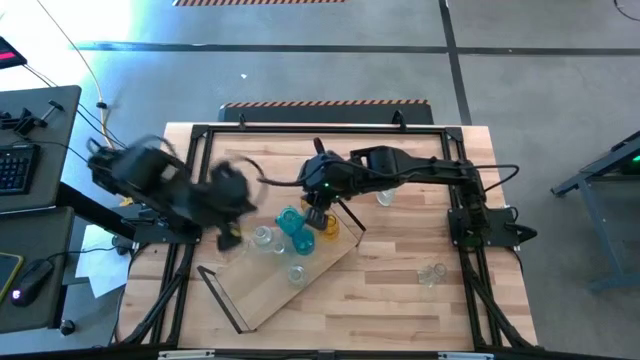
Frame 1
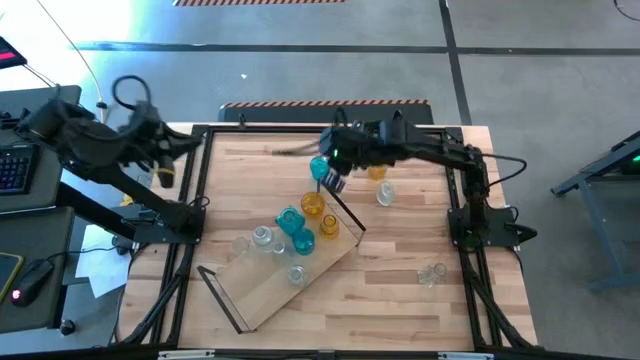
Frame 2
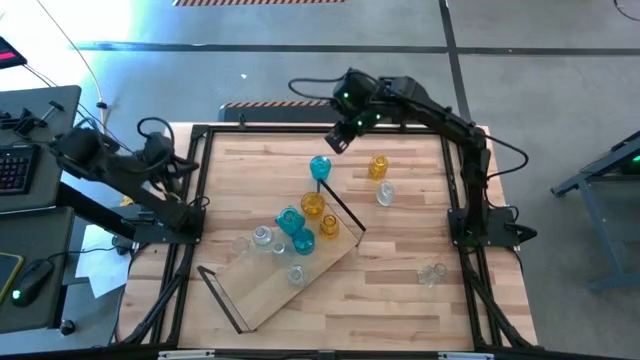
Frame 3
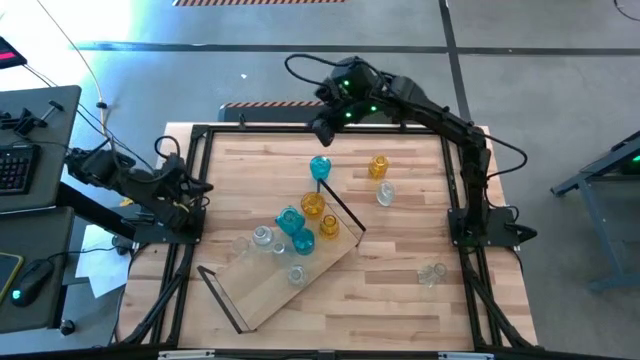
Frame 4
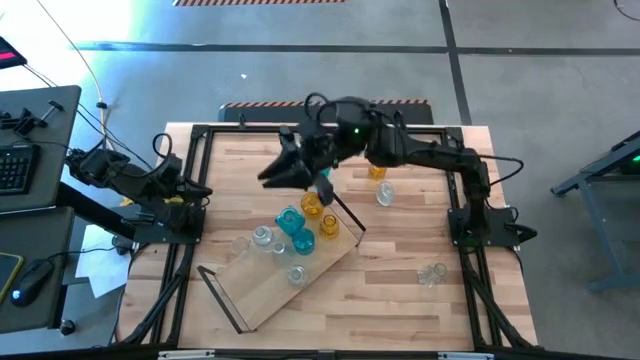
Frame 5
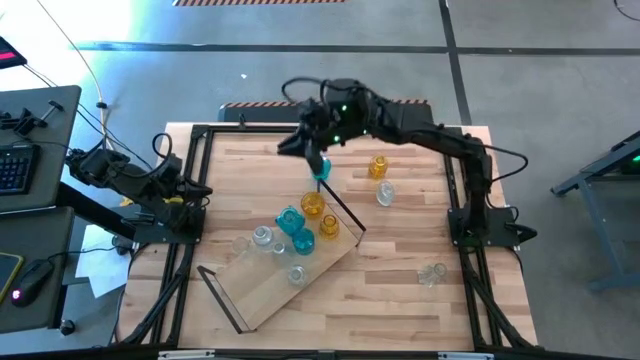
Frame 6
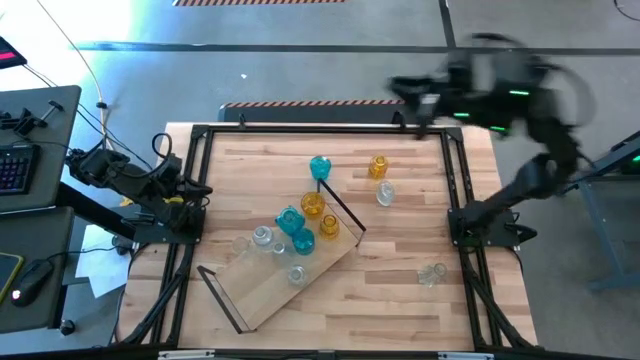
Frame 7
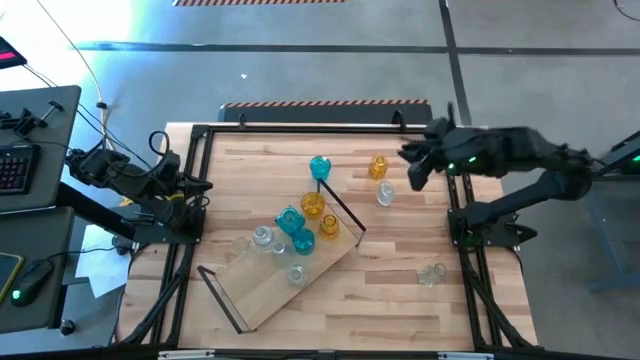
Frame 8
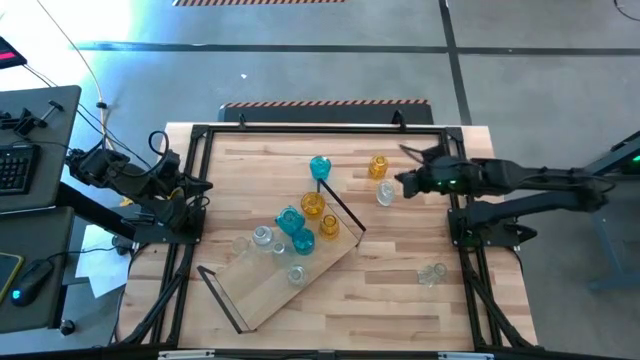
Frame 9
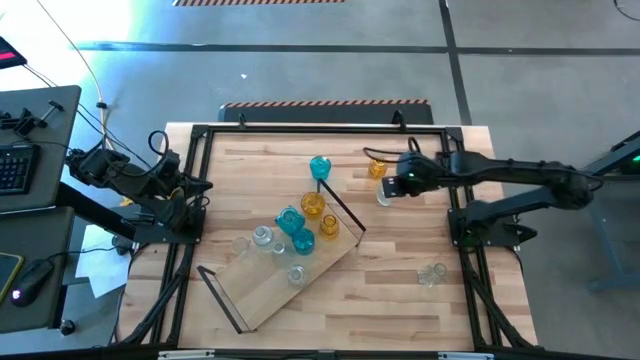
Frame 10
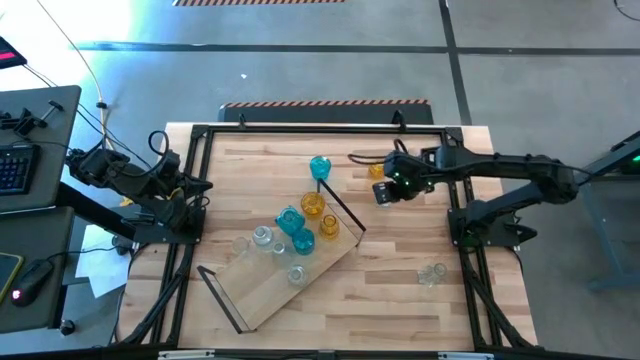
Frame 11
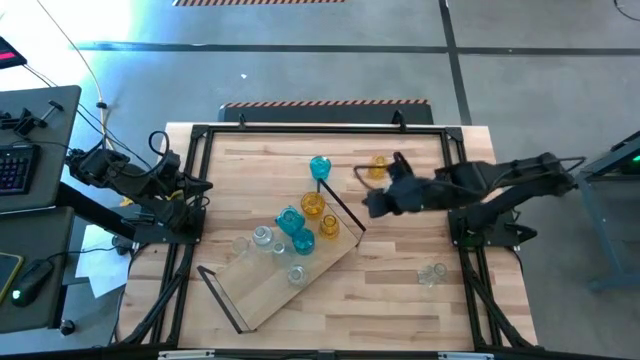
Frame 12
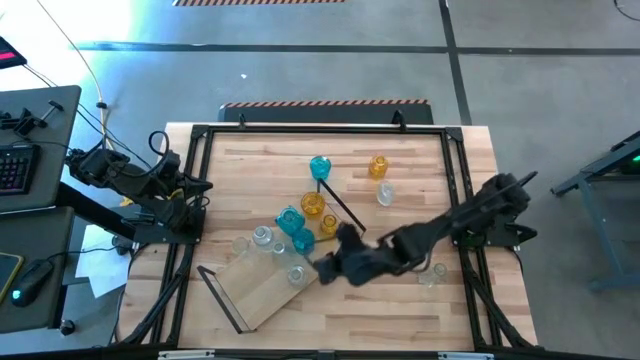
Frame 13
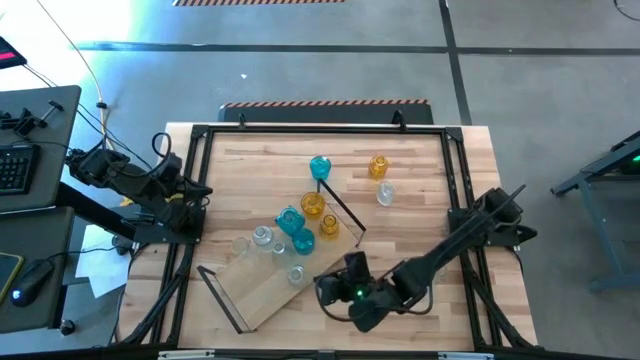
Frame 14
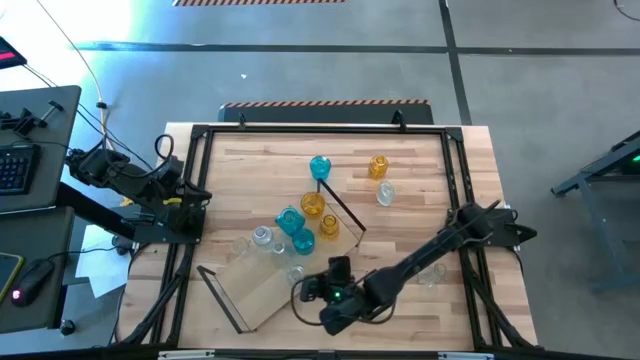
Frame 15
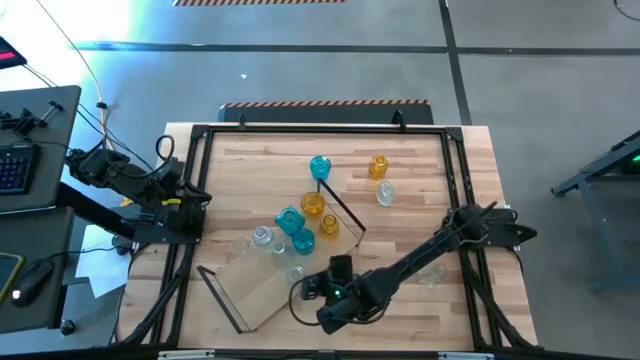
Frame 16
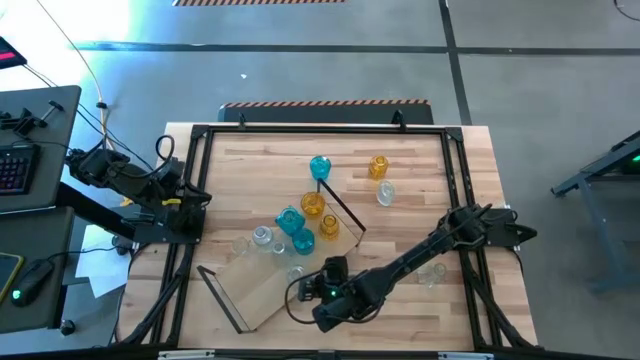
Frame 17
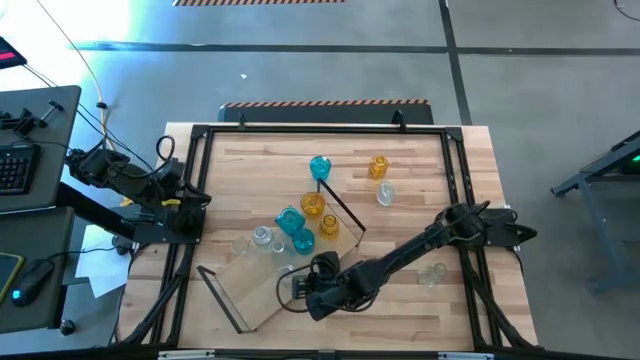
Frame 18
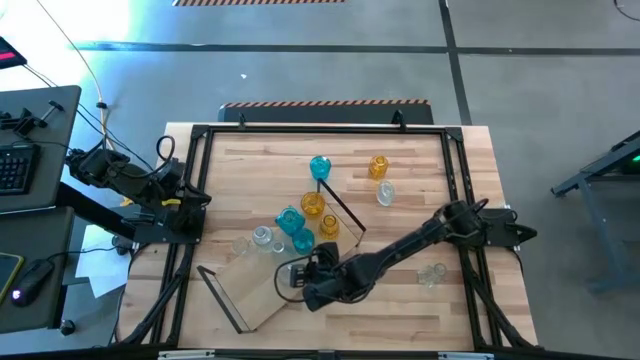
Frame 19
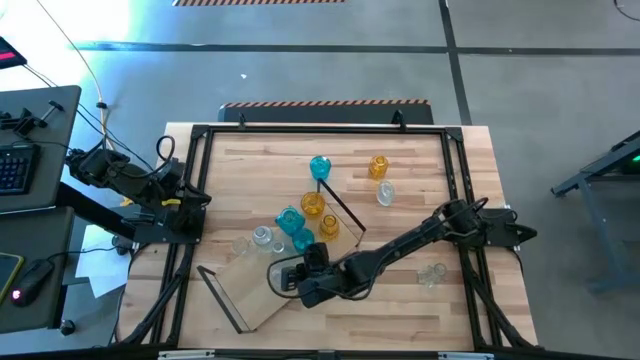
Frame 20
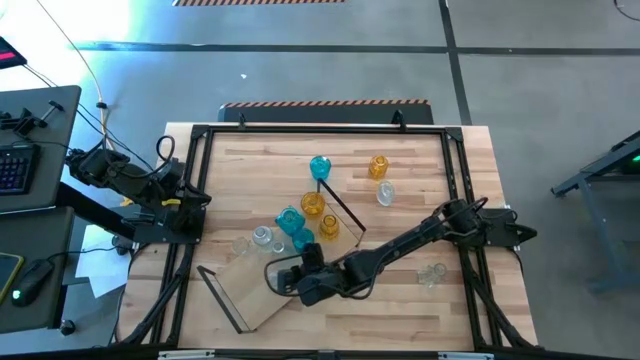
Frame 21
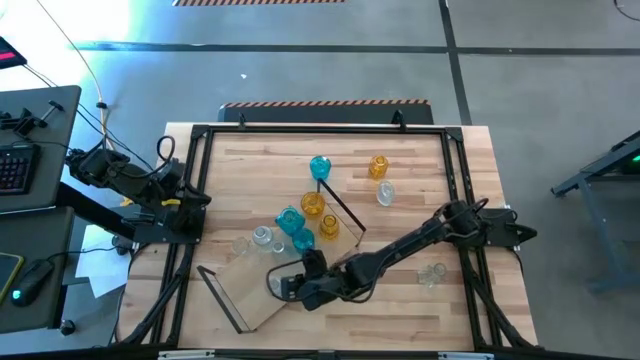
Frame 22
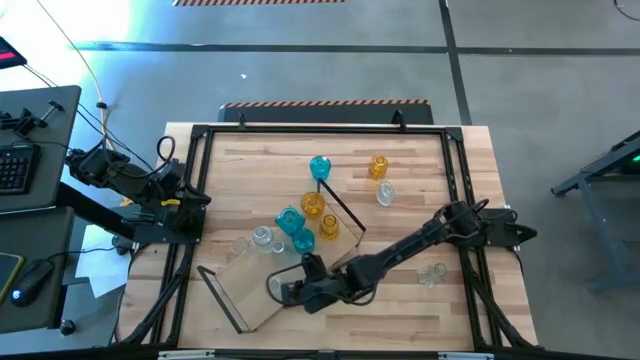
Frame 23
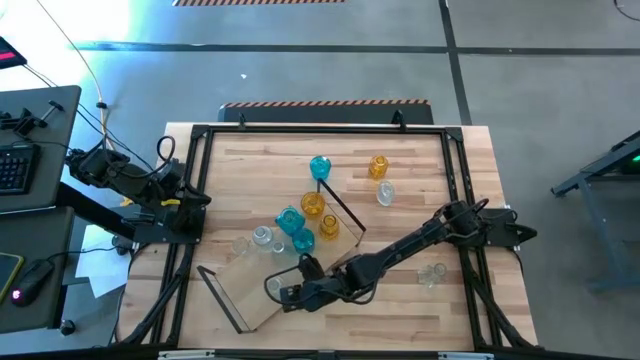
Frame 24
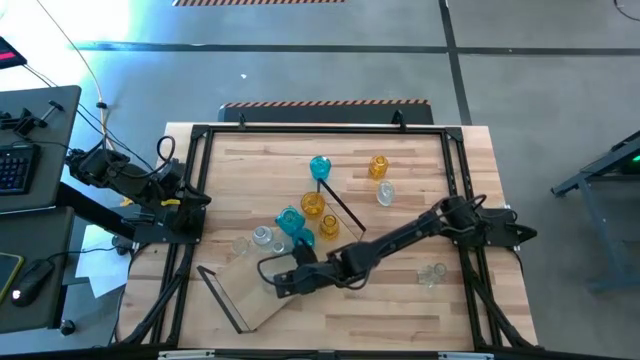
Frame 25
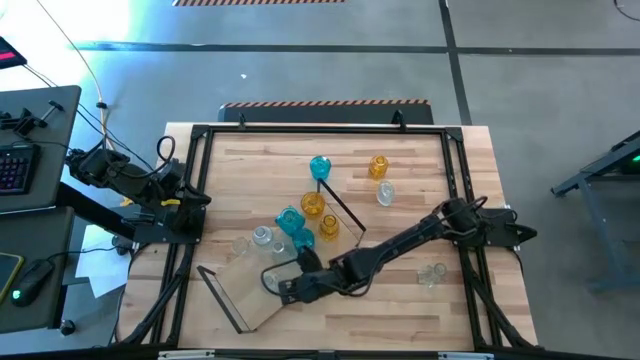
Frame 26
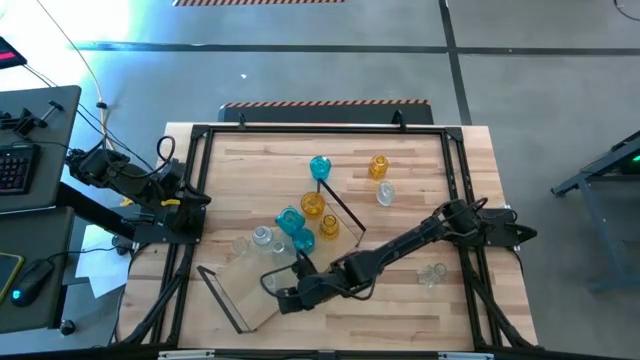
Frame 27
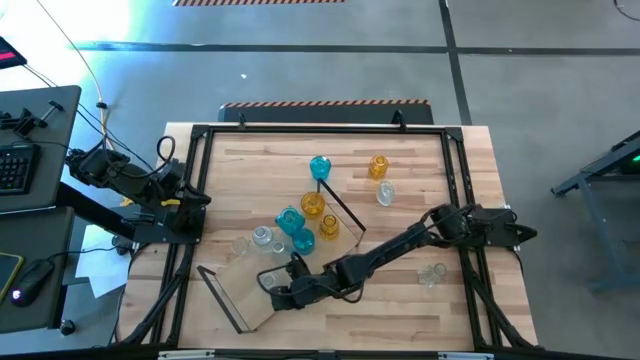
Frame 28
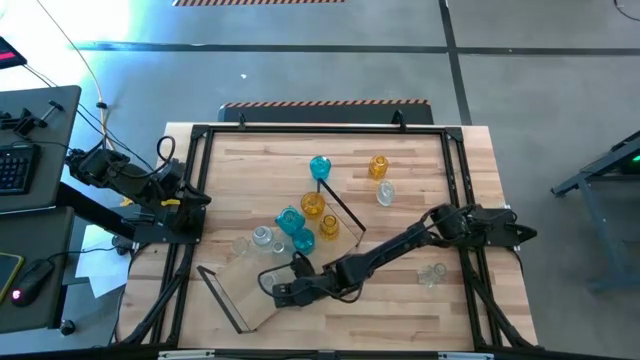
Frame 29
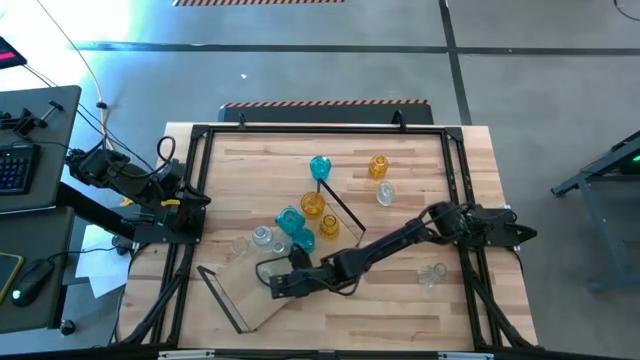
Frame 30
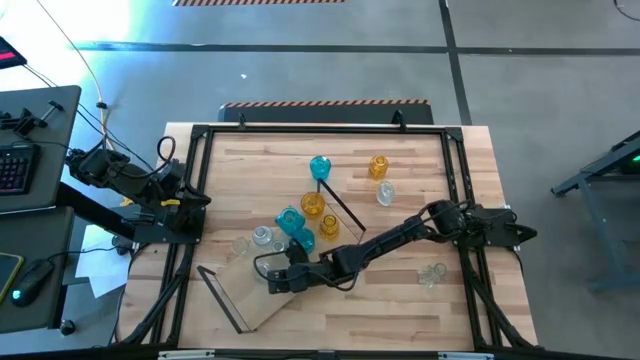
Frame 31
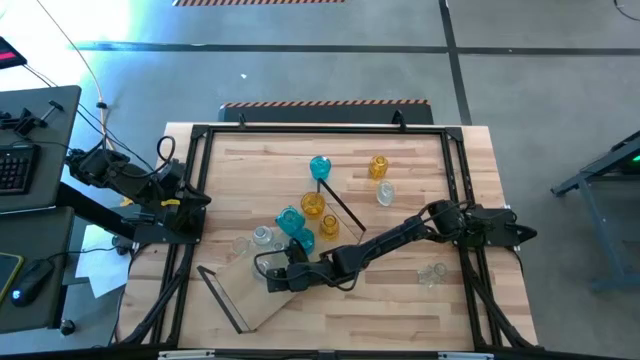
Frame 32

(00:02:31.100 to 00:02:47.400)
Task: sort vases onto shelf
Adjust the transparent vase on the shelf and align with the other transparent vase

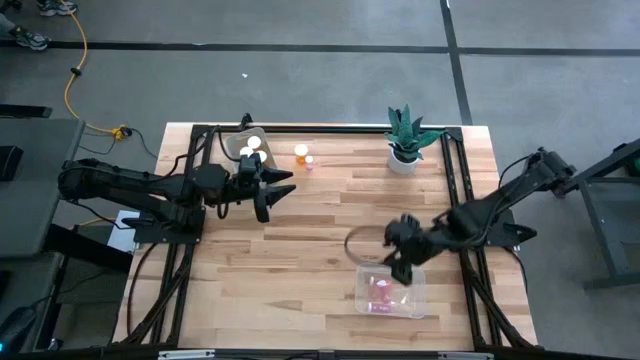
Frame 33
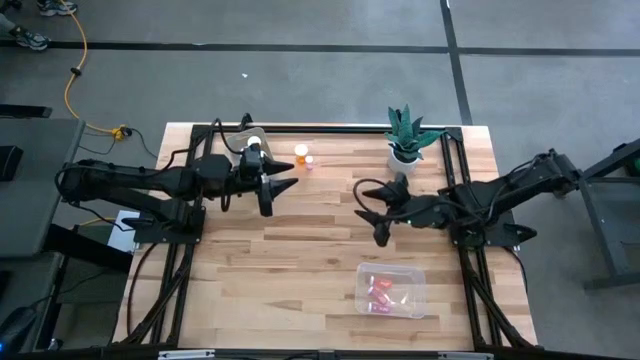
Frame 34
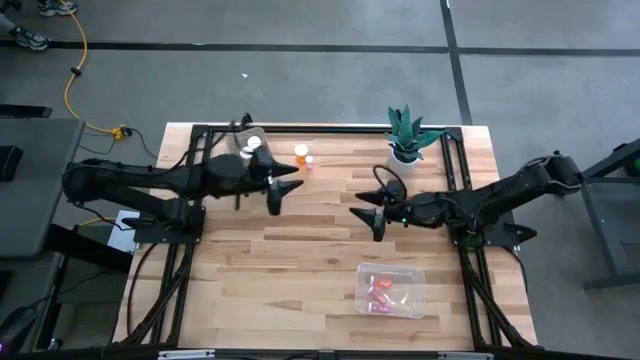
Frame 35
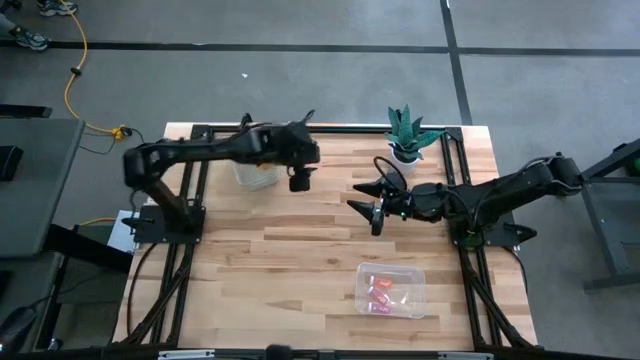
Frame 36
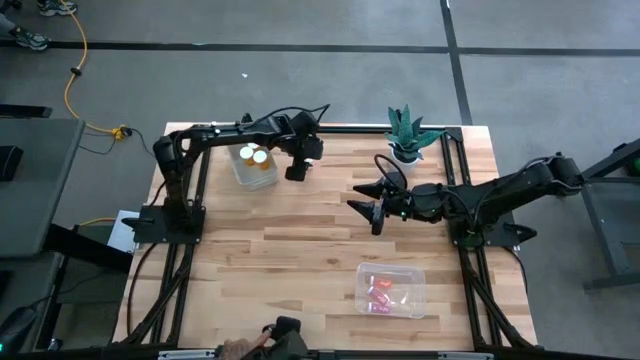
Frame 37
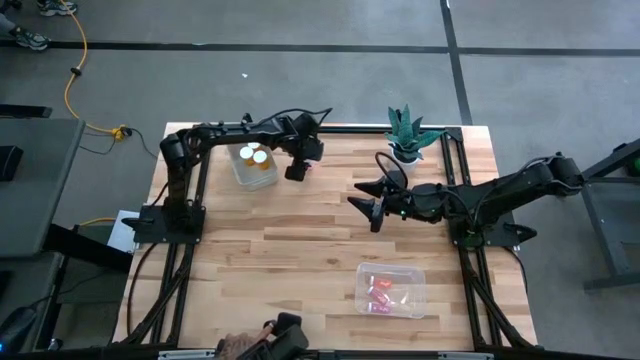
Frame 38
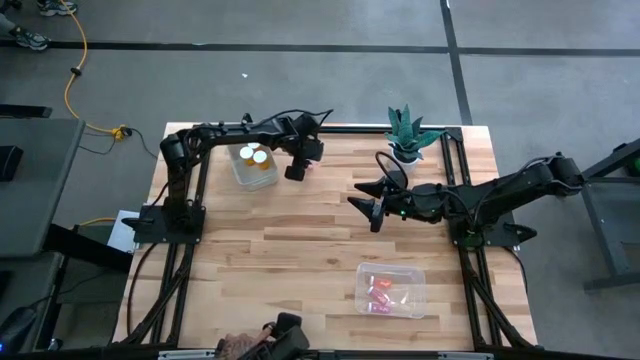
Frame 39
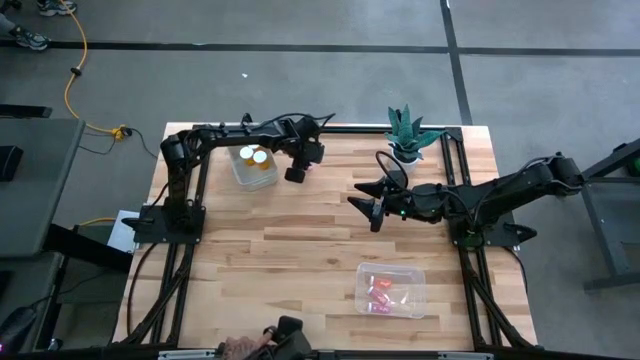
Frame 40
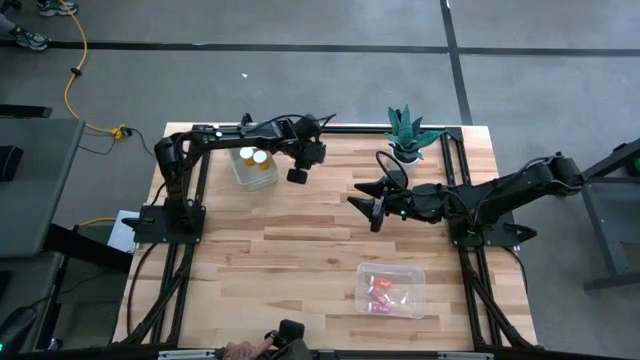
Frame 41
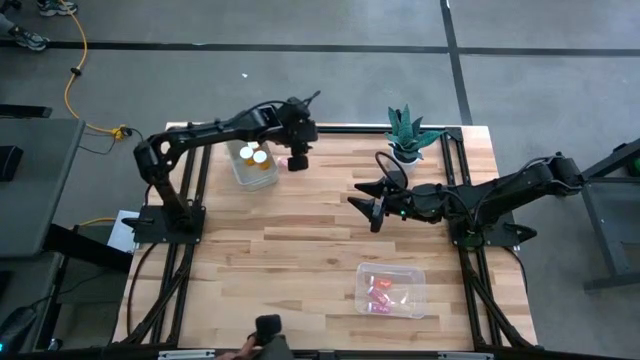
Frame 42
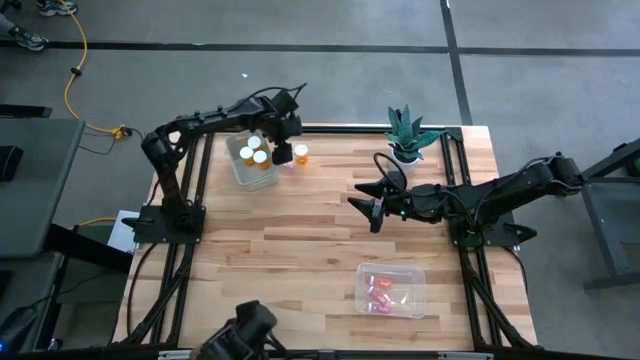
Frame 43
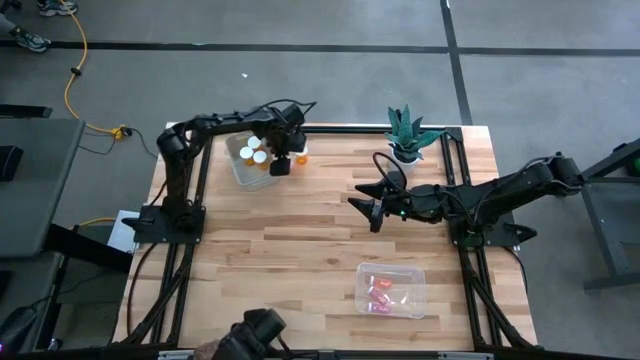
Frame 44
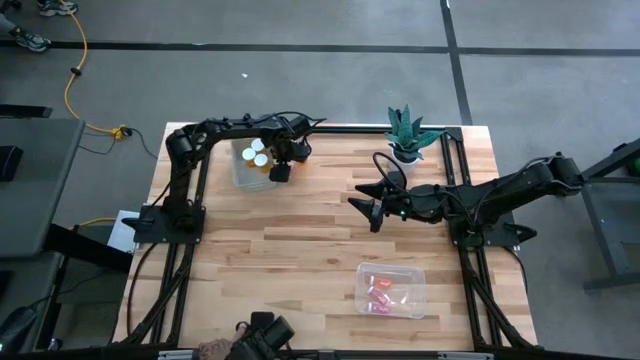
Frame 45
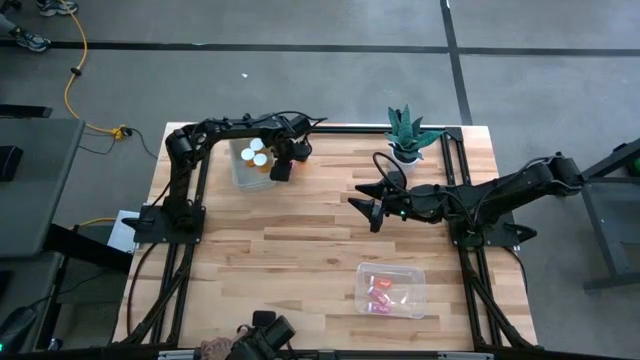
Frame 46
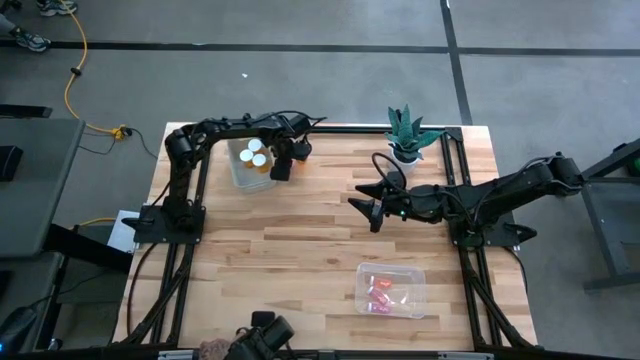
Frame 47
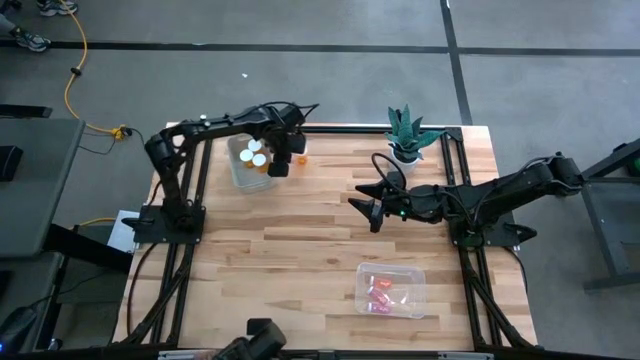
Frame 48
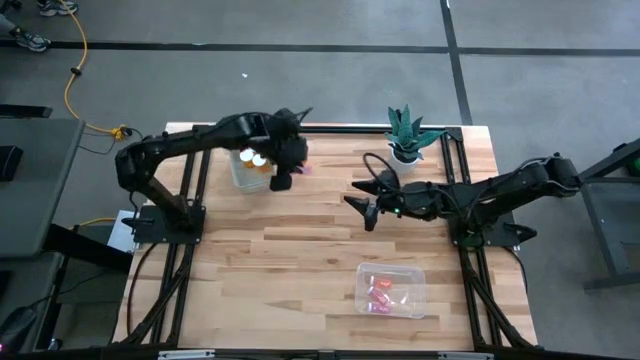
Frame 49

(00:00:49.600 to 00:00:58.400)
Task: Pick and place medicine bottles into bin by pill shape (circle, oval)
Put the small pink pill bottle into the transparent bin
